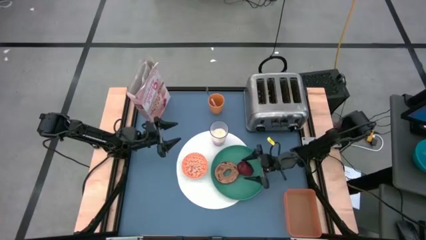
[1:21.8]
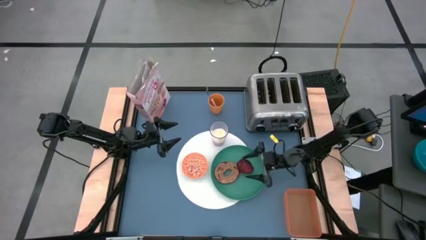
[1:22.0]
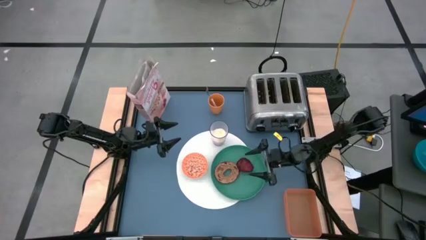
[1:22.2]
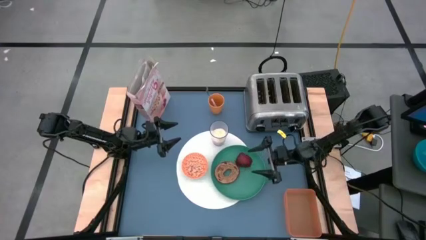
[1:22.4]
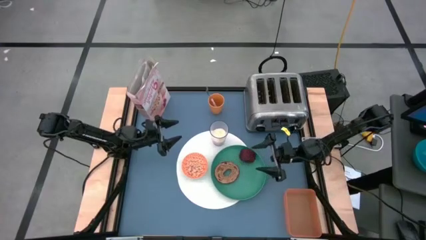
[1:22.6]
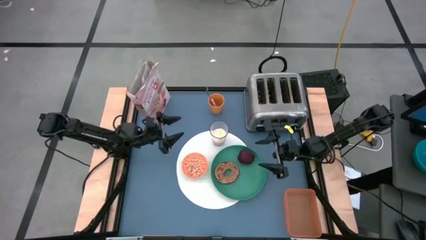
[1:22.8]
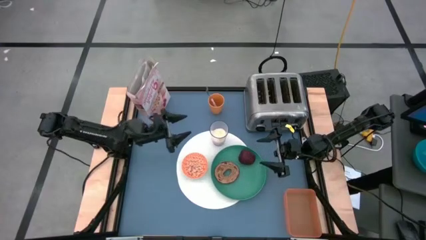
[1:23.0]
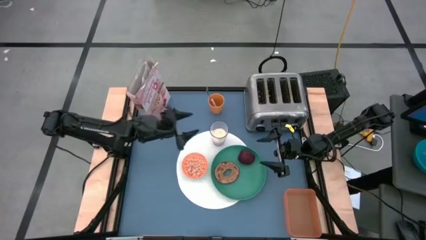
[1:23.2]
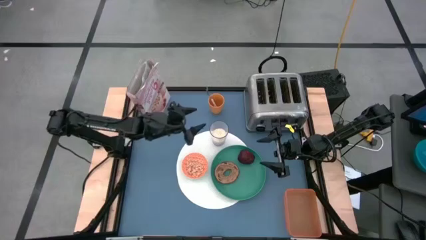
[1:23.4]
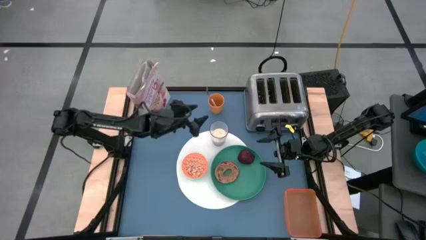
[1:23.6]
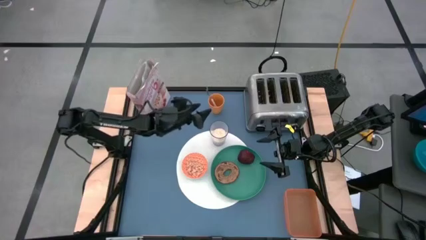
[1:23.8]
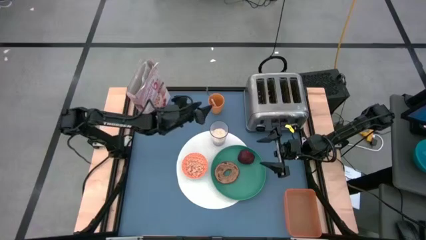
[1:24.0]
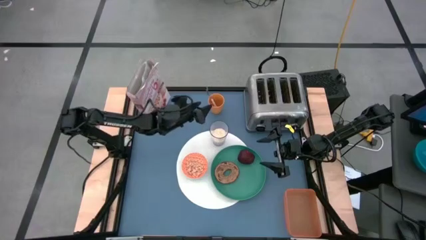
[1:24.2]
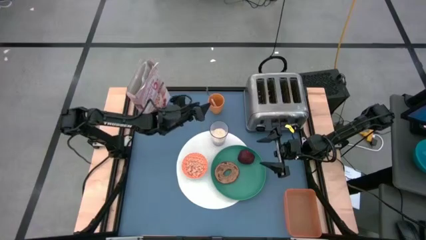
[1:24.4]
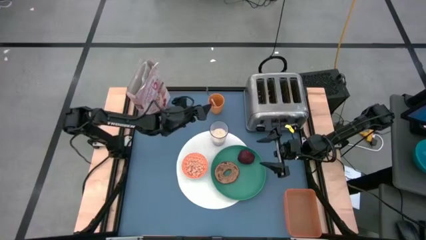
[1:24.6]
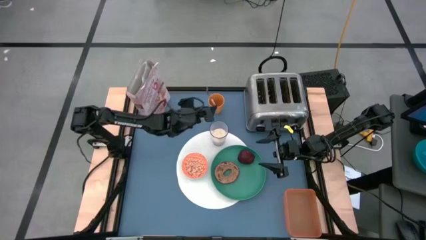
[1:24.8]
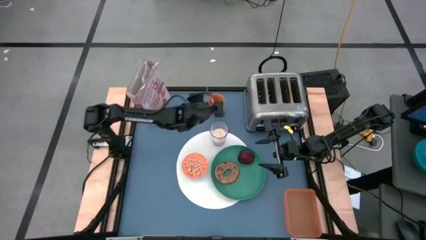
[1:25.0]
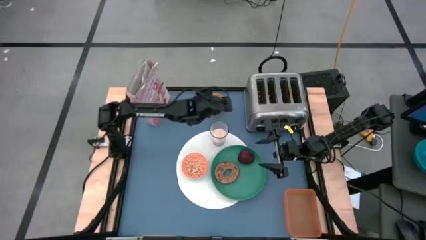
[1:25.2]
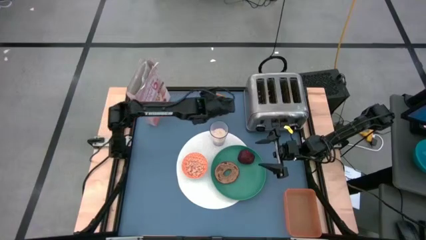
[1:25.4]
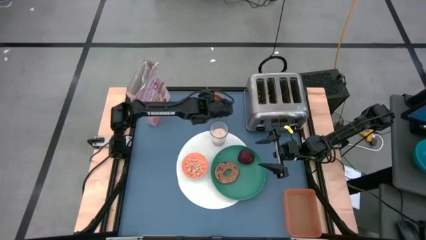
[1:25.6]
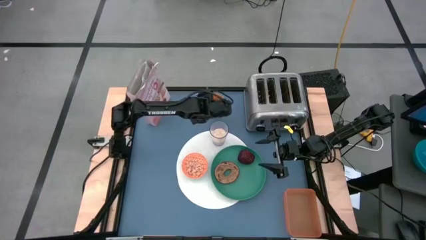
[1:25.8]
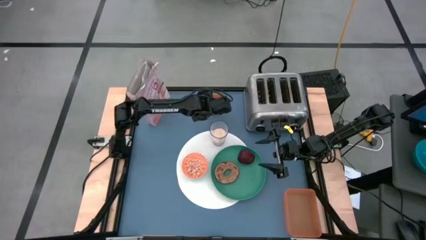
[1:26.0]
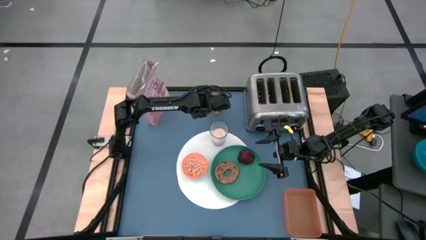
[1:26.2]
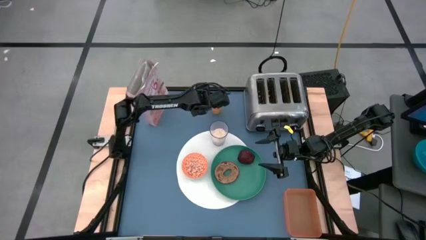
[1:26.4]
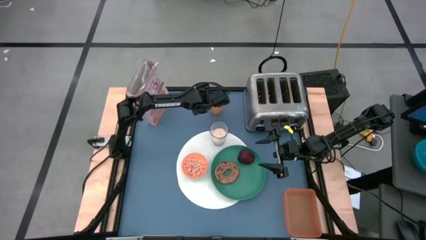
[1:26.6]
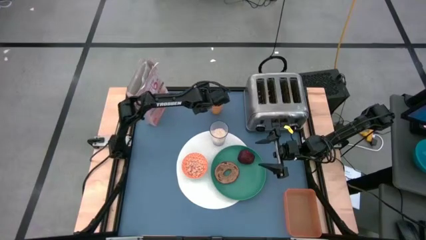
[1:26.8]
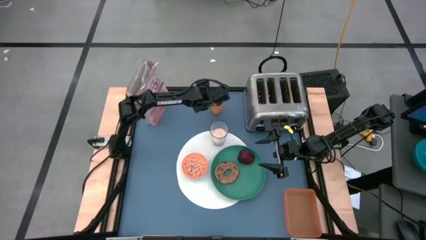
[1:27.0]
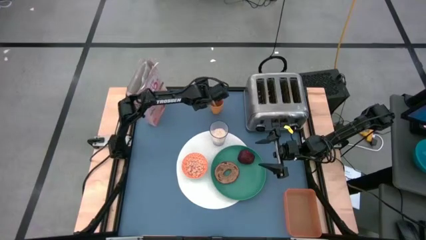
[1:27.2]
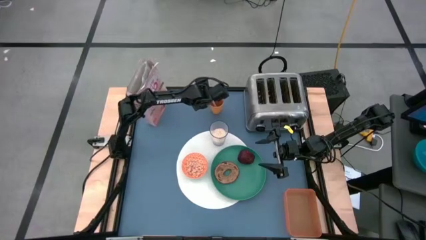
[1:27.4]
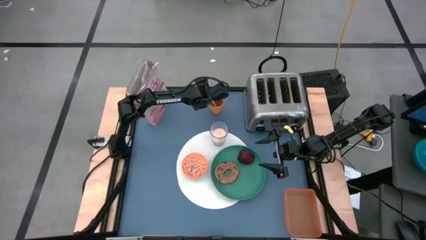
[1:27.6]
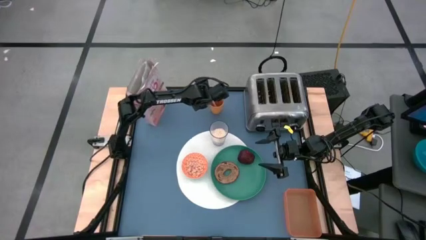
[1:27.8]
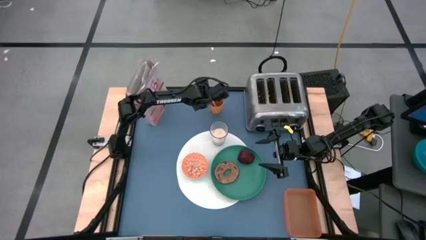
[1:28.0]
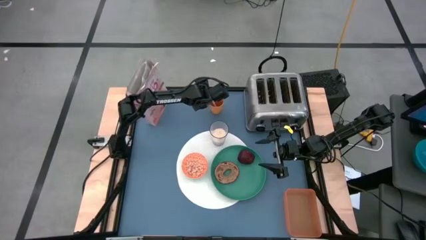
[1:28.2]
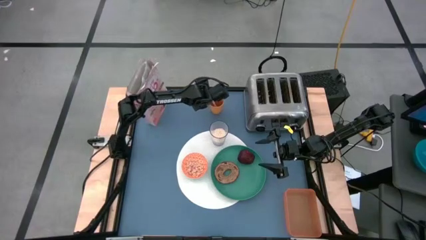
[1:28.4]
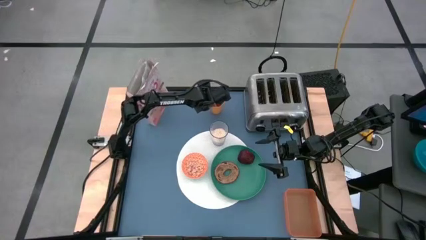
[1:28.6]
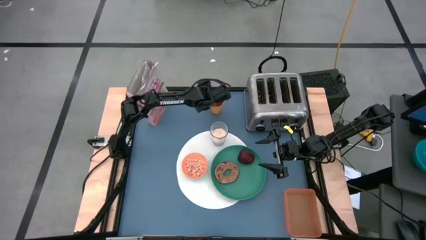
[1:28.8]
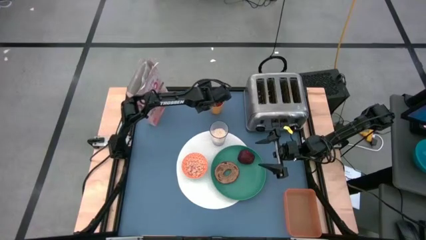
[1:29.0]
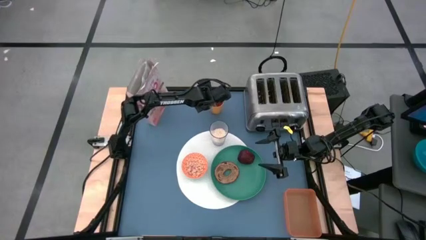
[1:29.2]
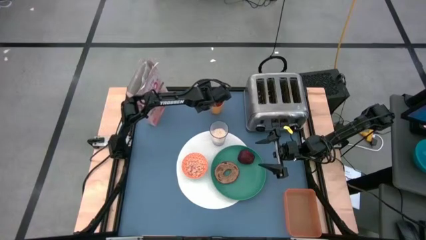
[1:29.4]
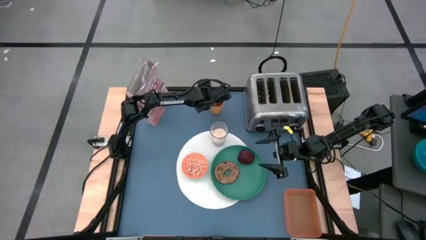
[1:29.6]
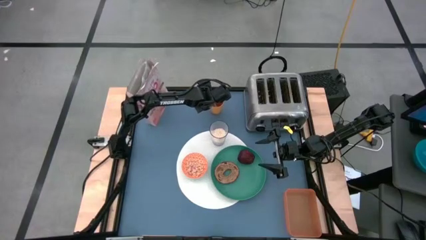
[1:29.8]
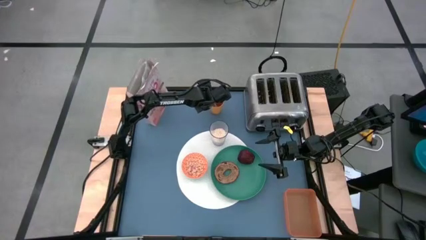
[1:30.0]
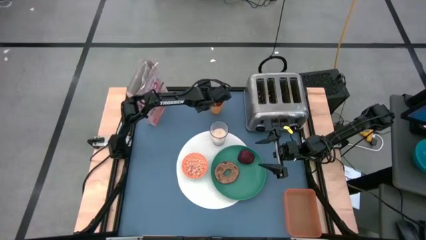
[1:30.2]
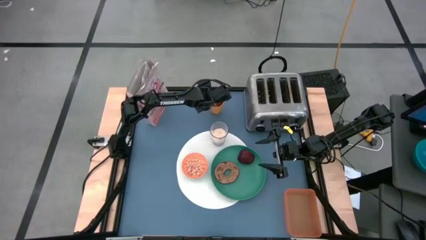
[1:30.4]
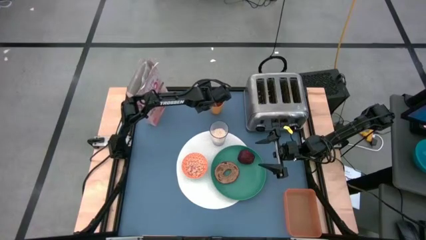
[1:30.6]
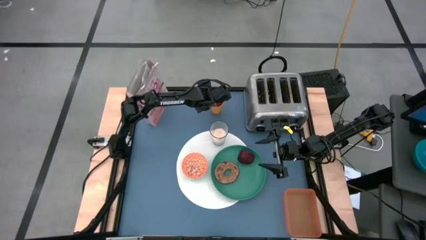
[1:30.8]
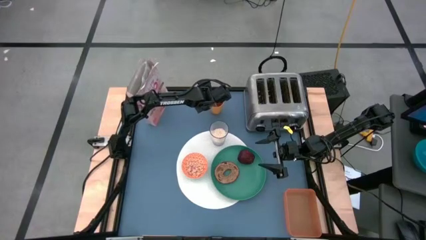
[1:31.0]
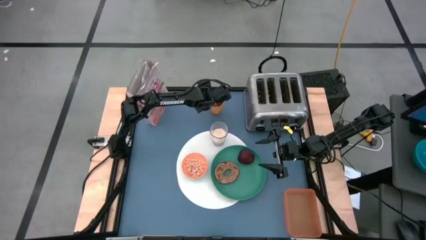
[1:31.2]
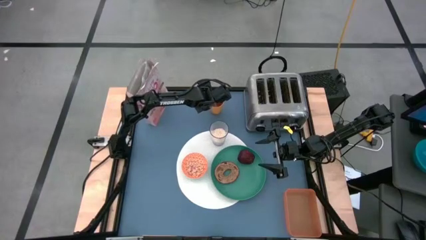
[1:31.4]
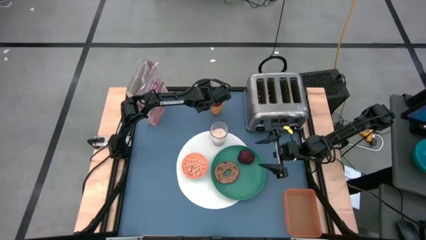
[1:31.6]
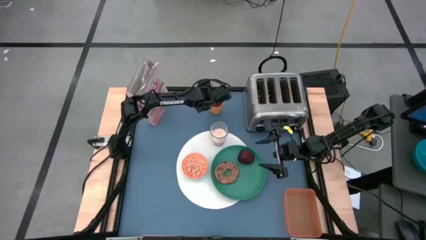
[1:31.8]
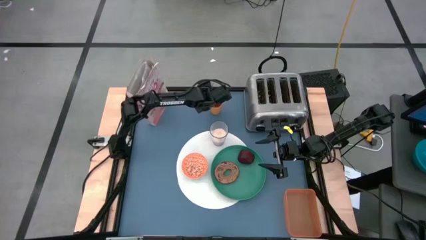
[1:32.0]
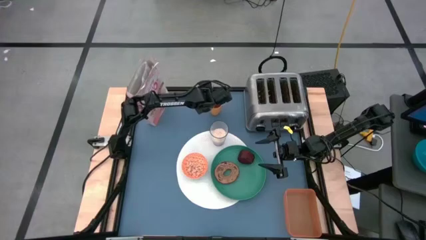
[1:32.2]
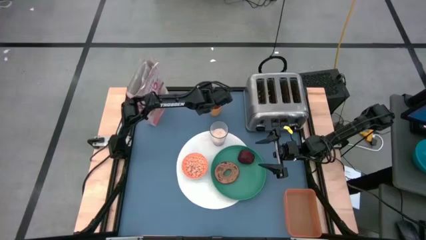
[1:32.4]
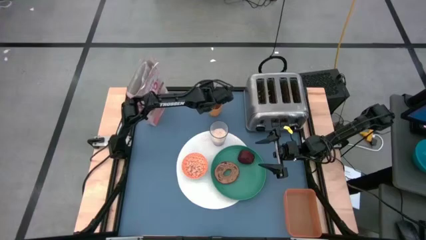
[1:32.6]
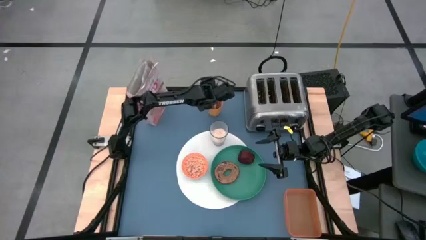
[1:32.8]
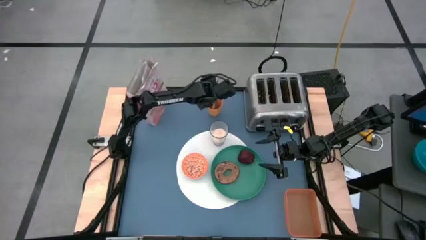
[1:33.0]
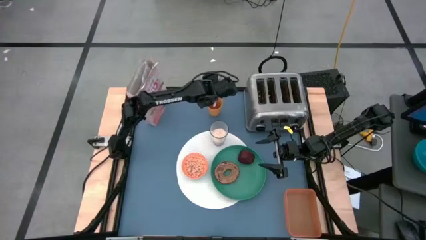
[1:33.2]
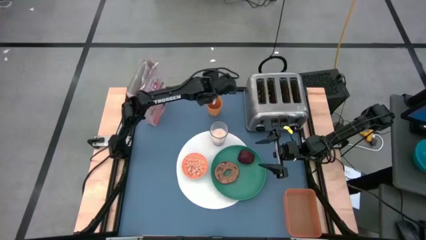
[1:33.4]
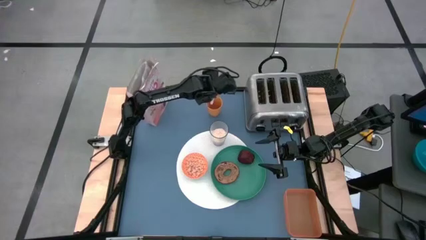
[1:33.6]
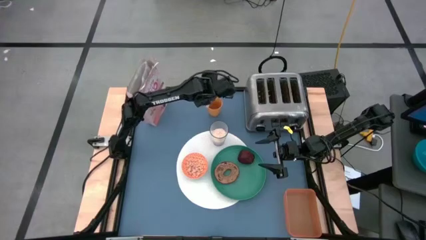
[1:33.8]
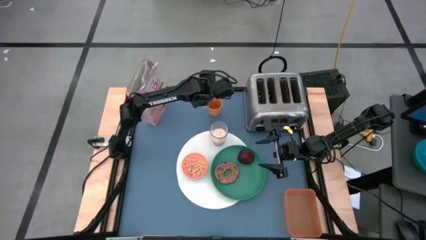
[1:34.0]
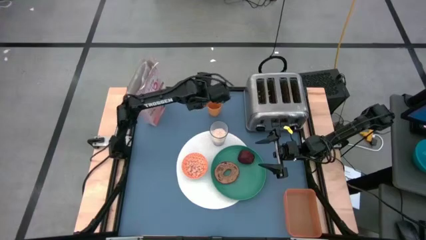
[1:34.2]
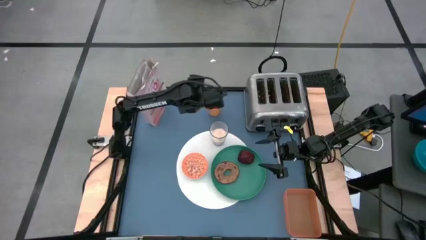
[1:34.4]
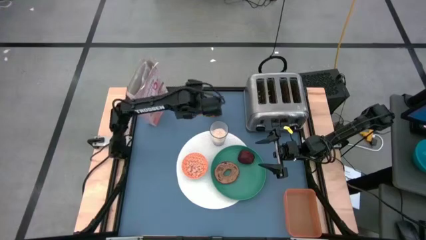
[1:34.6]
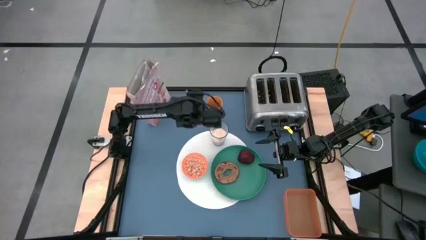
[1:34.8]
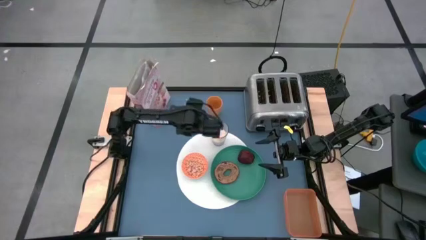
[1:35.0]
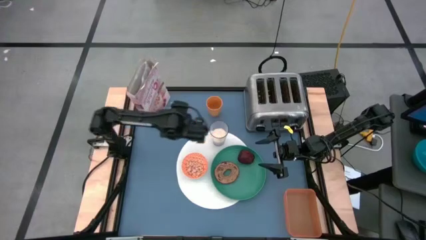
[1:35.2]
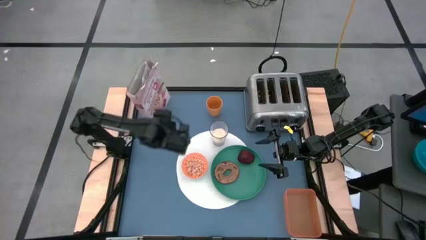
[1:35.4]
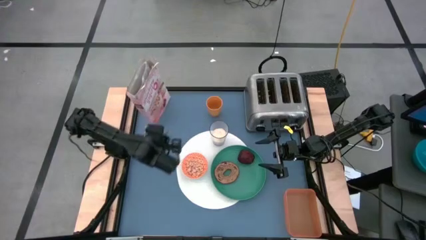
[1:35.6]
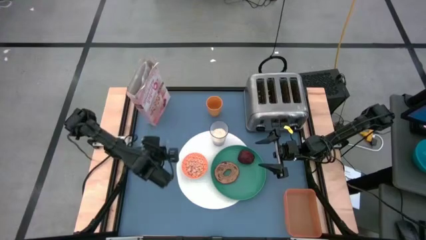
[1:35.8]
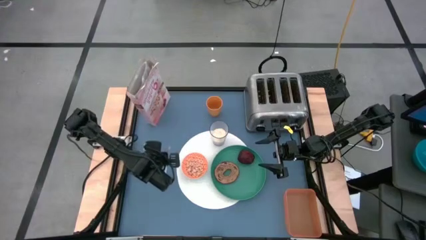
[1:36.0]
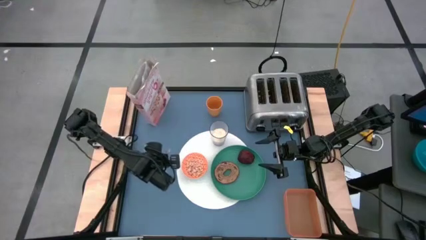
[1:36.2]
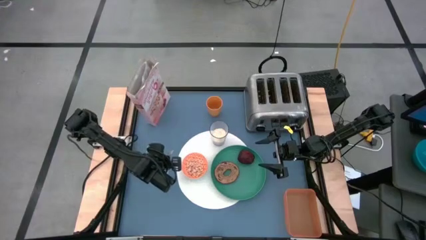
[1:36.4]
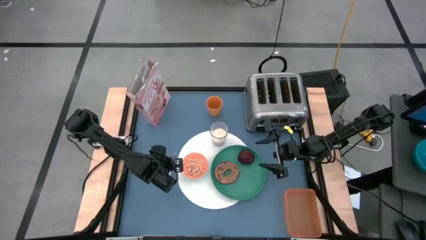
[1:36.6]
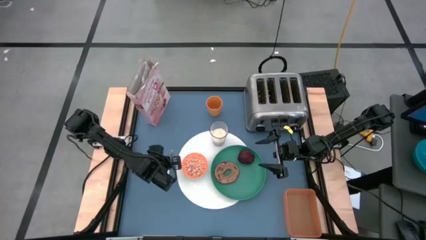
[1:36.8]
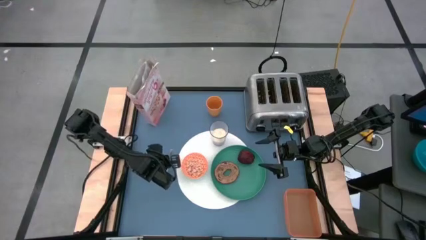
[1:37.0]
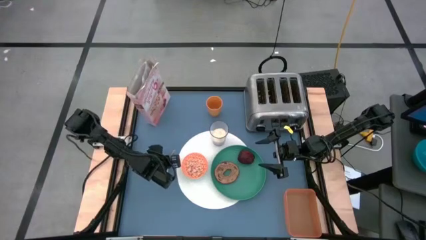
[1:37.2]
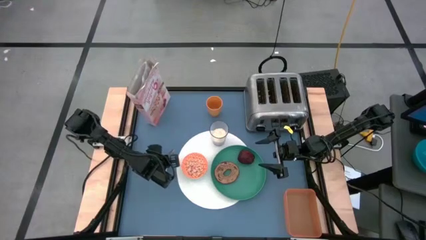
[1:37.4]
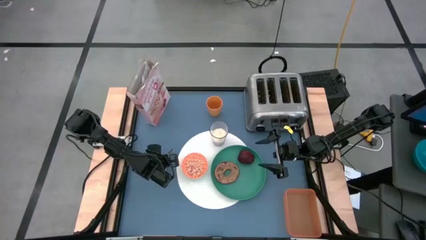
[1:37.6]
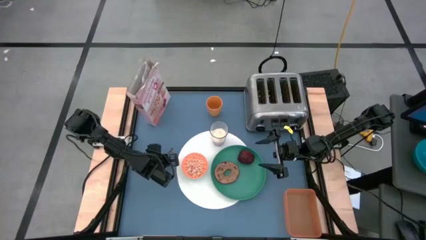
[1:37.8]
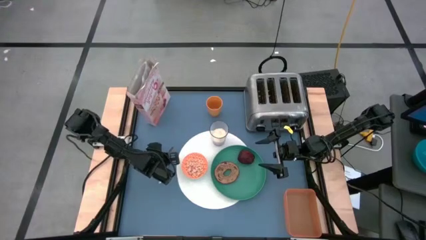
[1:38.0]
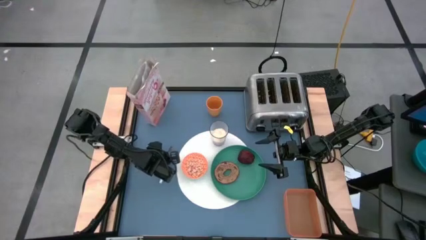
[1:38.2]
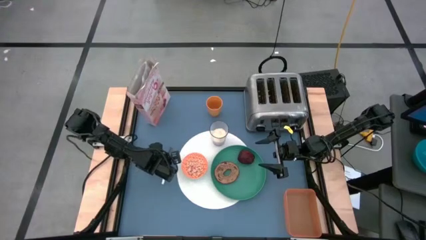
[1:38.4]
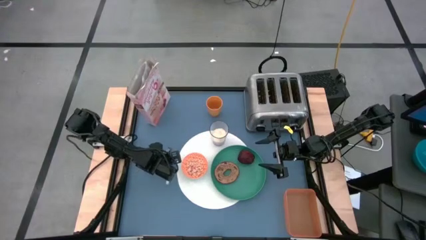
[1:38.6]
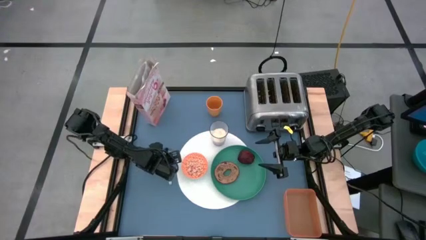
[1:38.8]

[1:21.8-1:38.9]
Task: Arrange a breakfast setting
Put the blue patterned spoon to the left of the white tablemat
